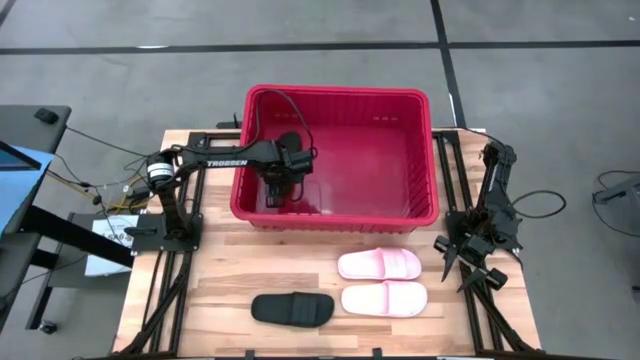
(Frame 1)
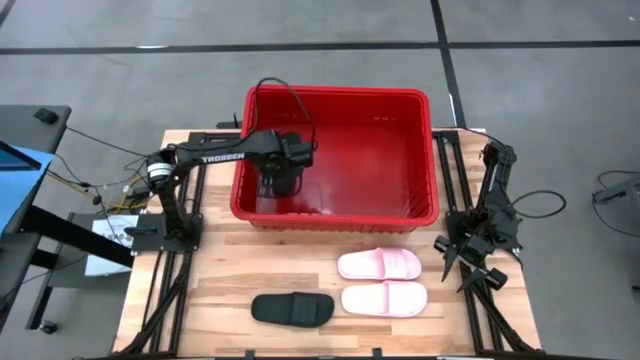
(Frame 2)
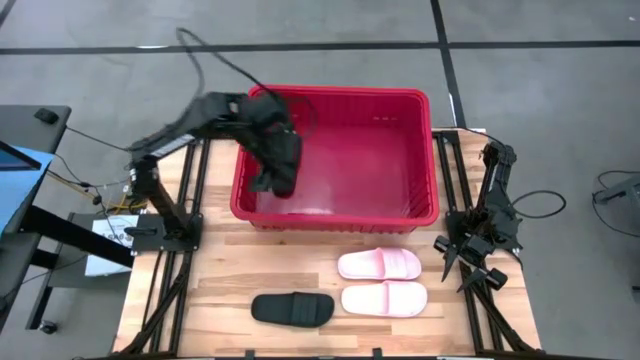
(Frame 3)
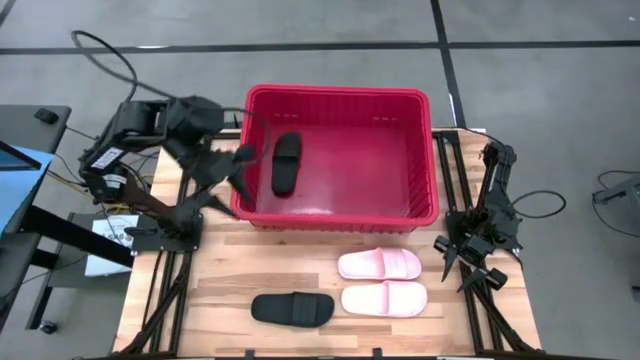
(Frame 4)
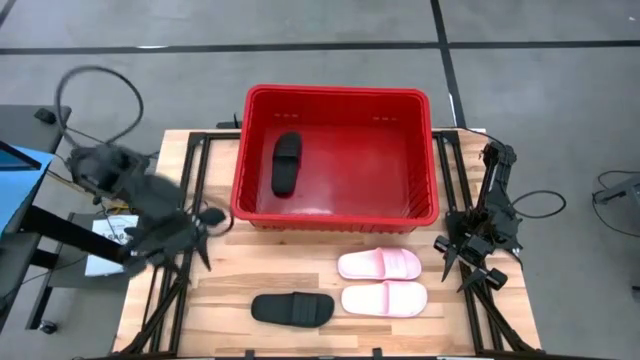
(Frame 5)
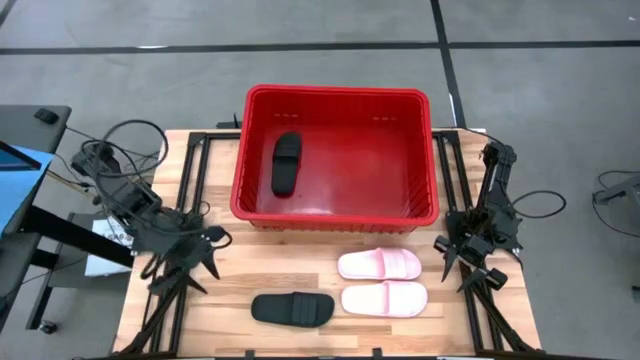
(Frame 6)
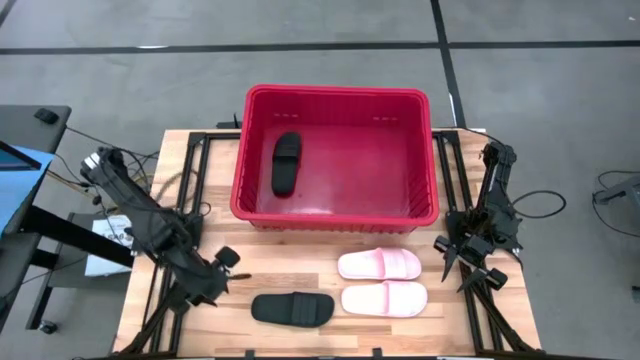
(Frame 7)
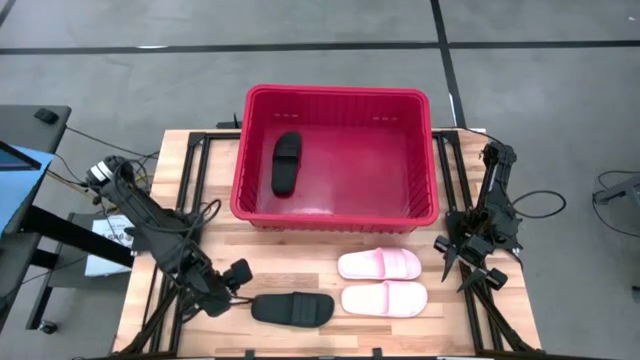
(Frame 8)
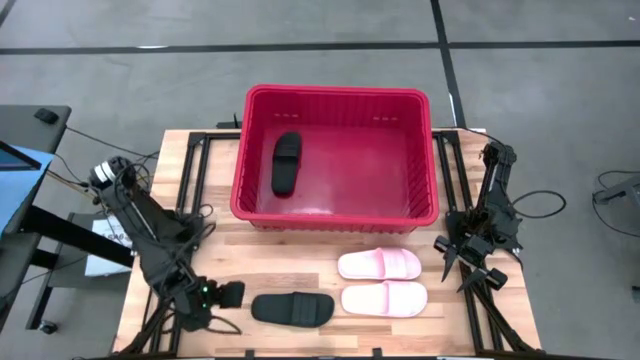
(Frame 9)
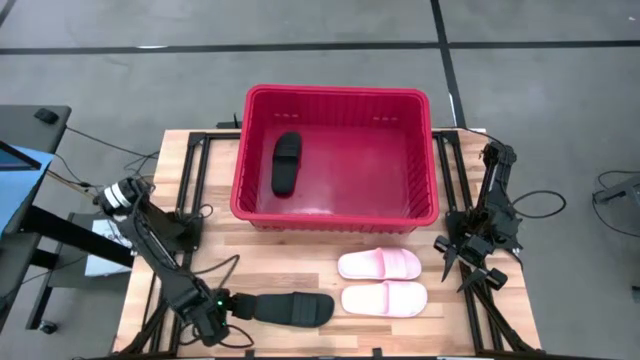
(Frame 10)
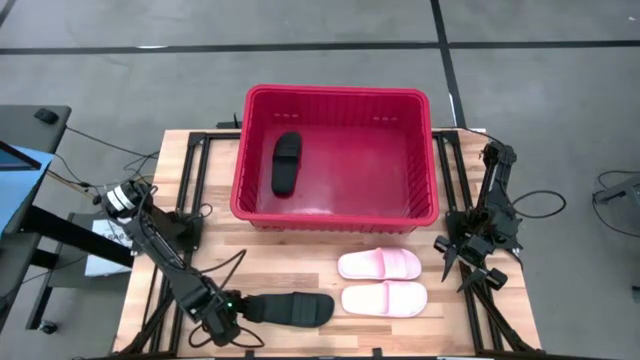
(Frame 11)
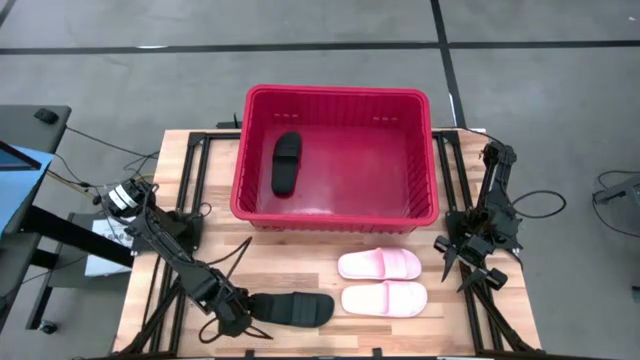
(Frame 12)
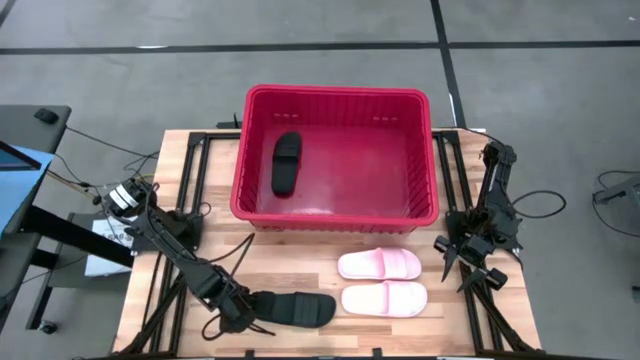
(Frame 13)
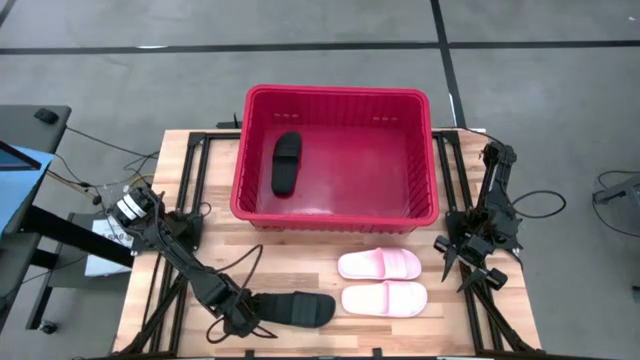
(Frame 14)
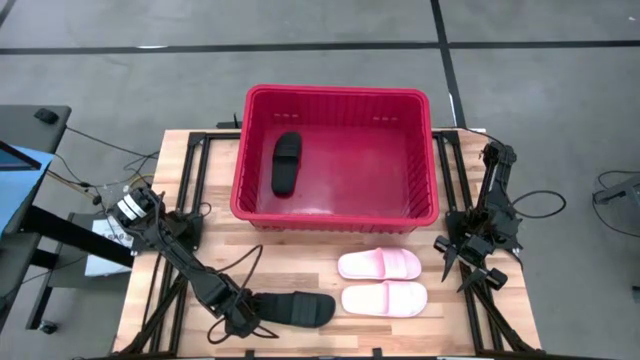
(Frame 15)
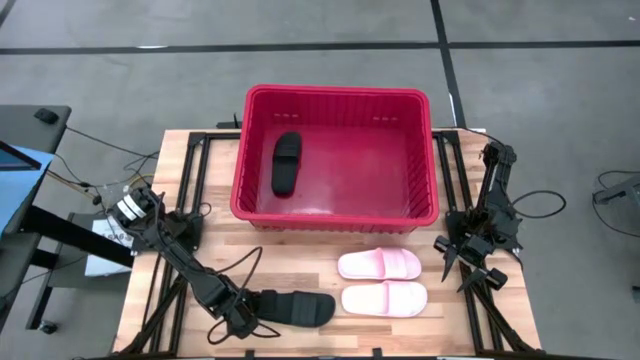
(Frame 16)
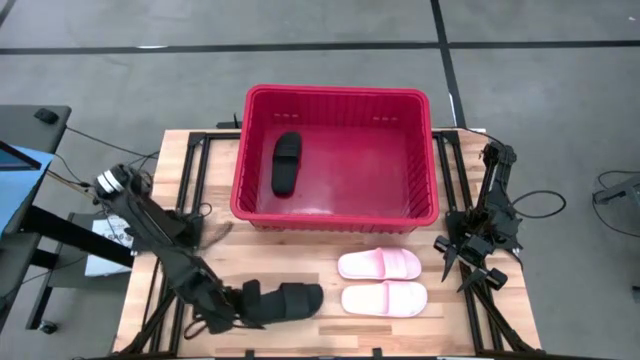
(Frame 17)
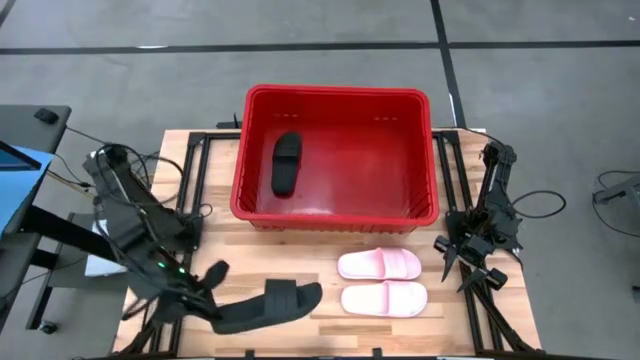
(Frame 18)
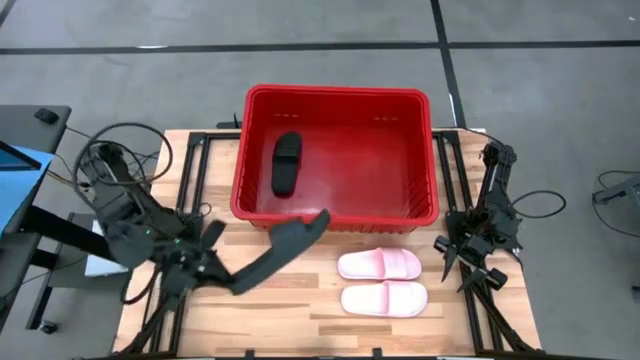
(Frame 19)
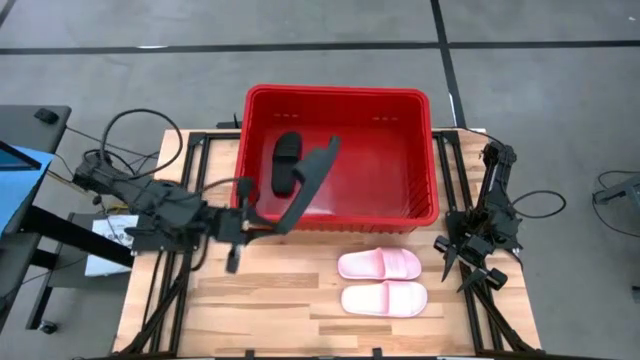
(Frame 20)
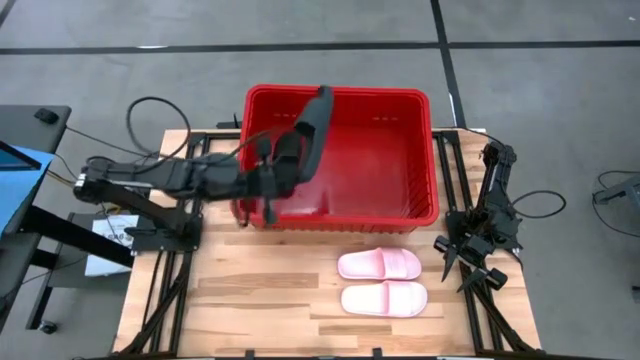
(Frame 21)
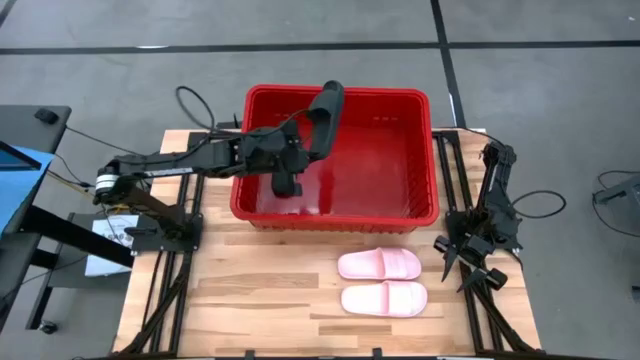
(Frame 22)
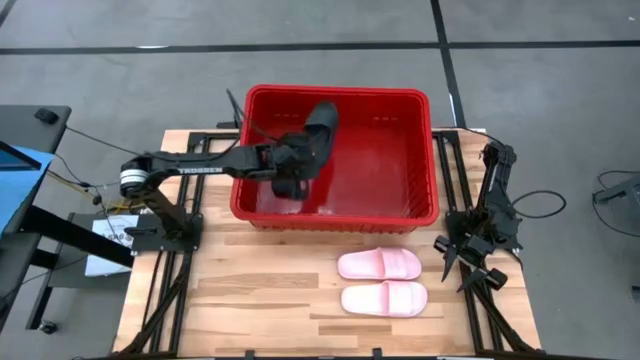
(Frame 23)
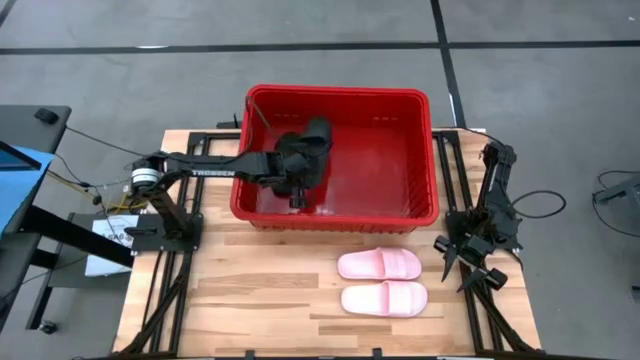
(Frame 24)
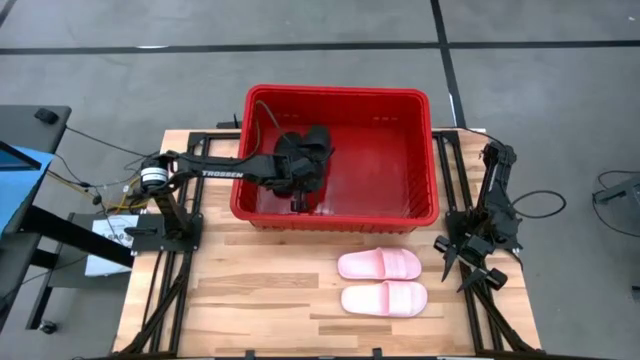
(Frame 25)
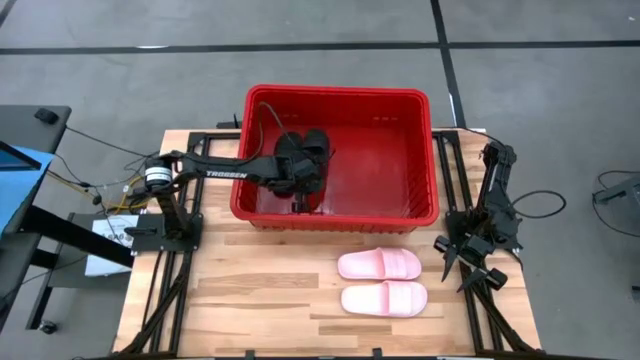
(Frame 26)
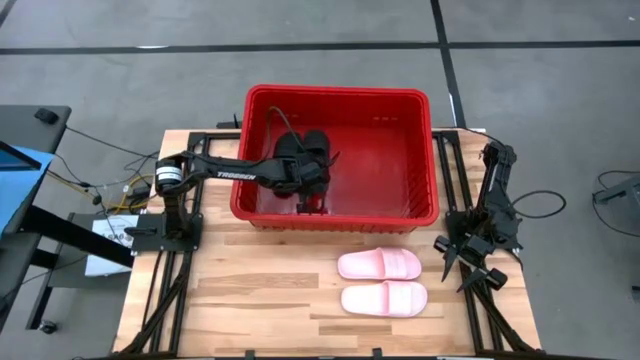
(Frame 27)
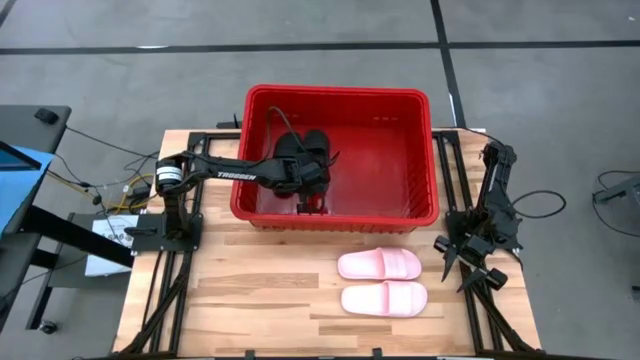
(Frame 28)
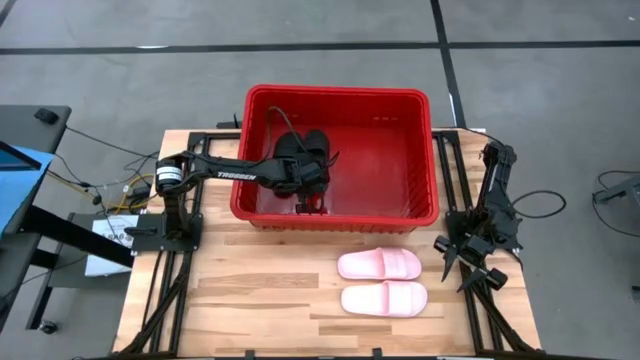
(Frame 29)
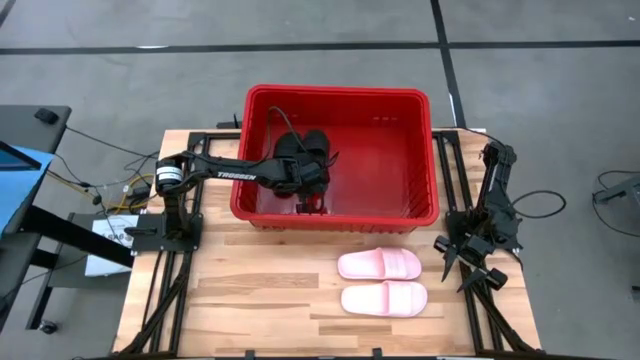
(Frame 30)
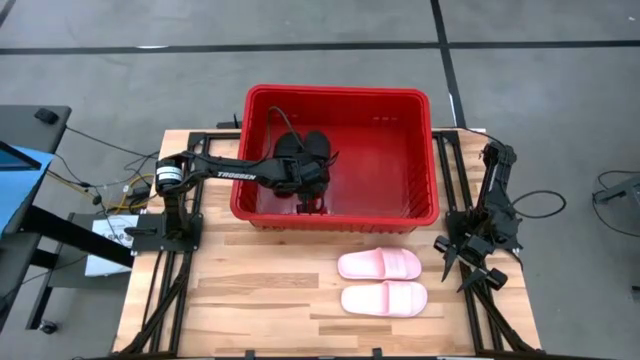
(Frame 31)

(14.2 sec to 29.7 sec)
Task: Pick and place slides into bin
Put the black slipper into the red bin

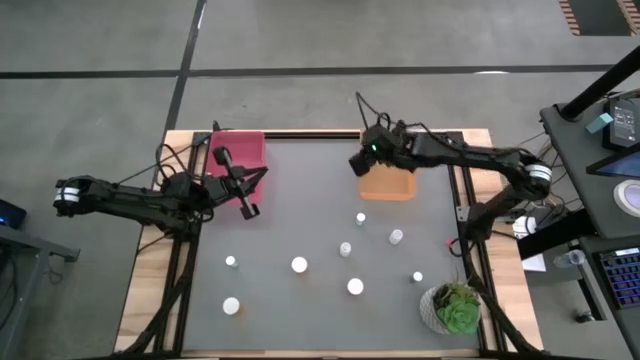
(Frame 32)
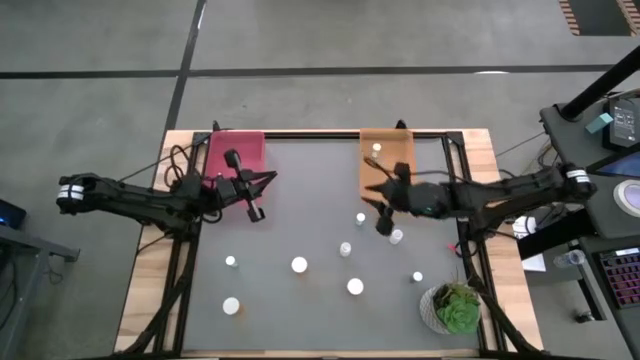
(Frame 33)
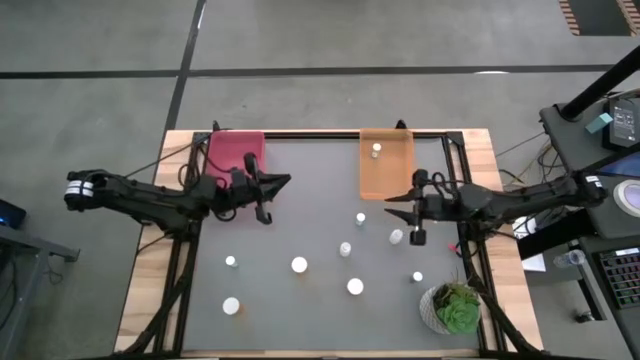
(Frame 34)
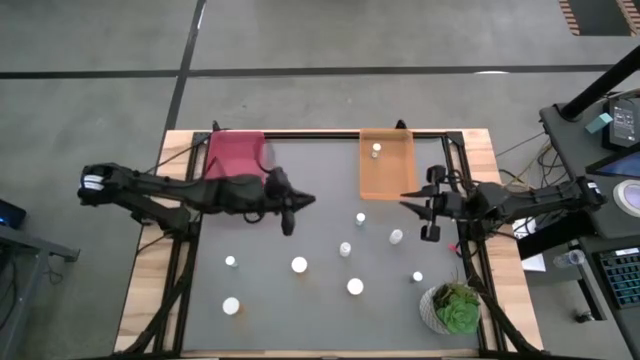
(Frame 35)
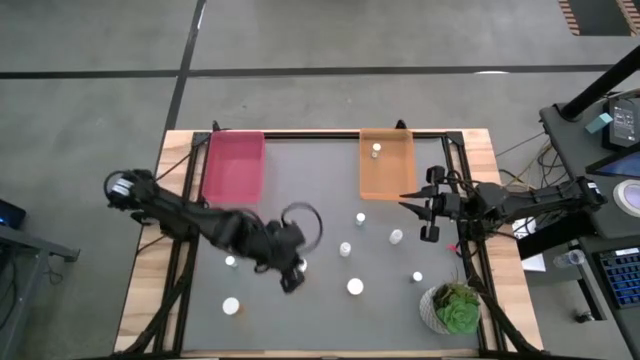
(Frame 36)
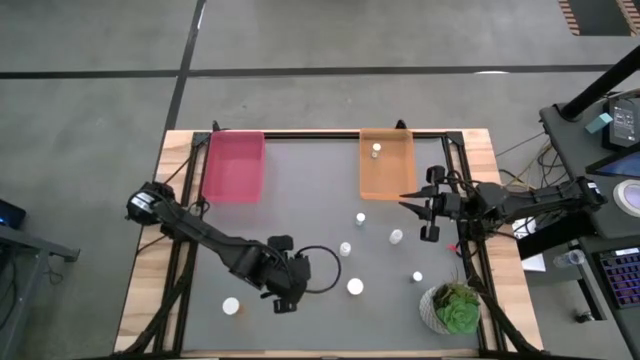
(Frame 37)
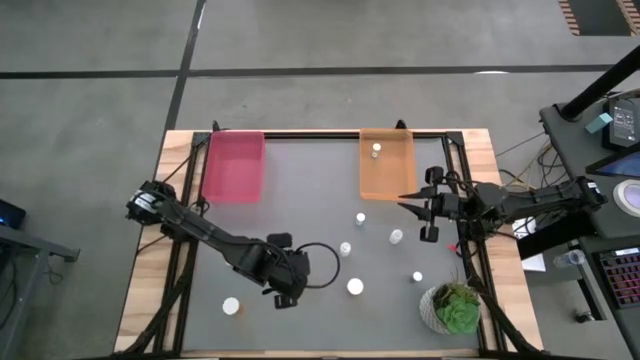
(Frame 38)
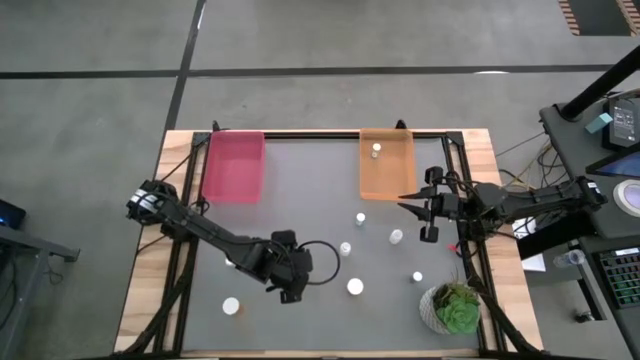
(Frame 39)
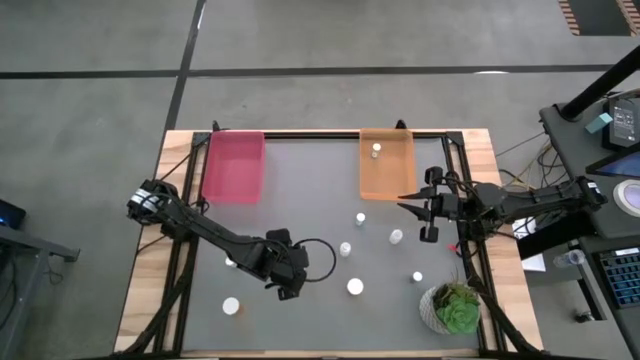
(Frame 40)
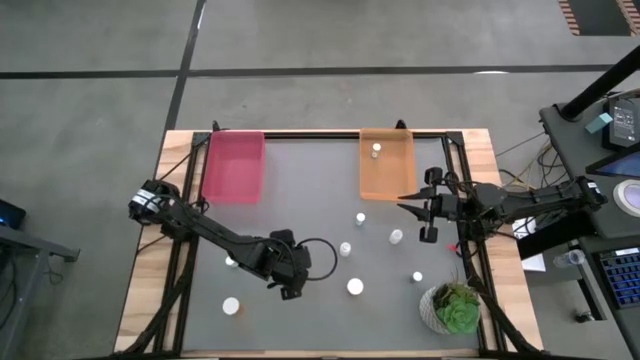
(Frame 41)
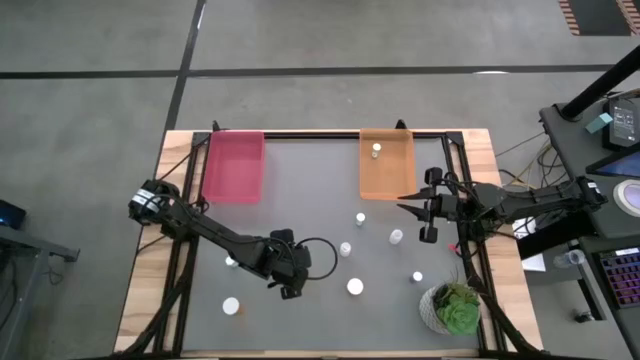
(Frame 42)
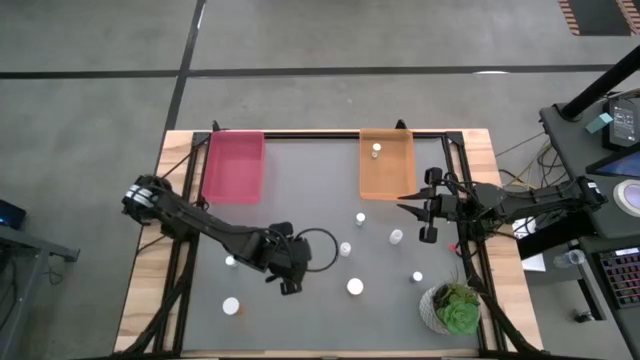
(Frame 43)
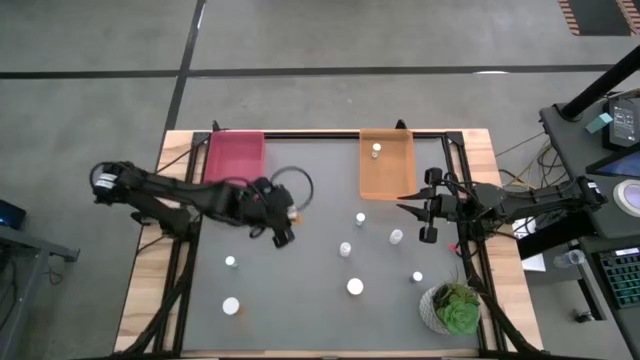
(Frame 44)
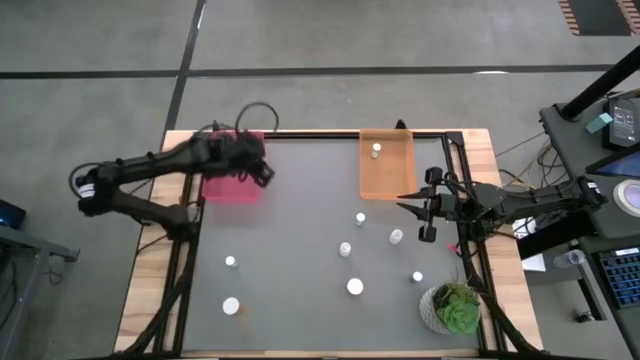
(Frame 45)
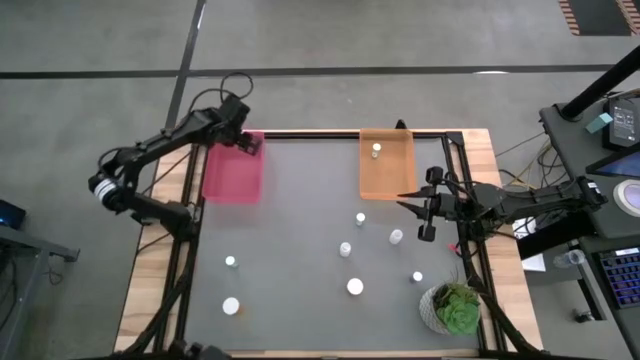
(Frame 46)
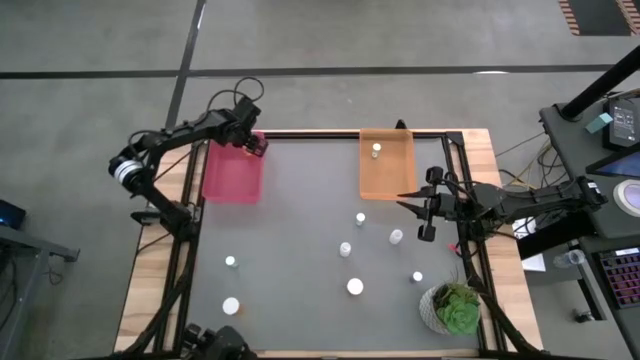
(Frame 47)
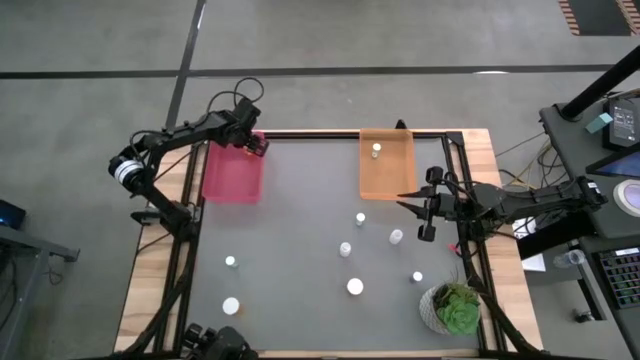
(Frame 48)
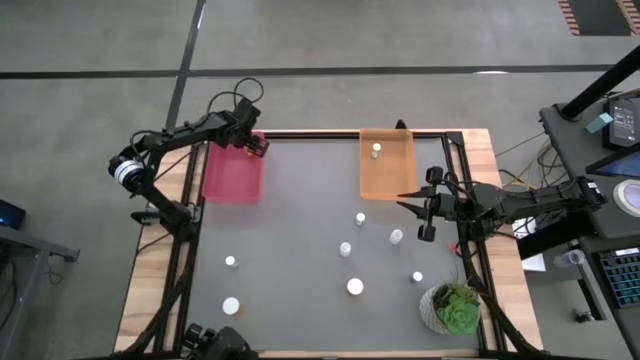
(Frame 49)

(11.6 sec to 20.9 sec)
Task: Pick and place medicine bottles into bin by pill shape (circle, oval)
Put the middle orange capsule bottle into the pink bin
